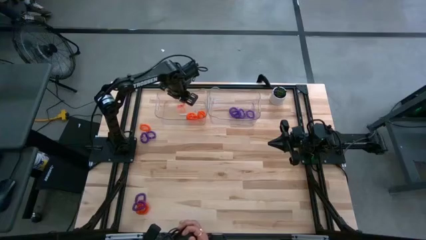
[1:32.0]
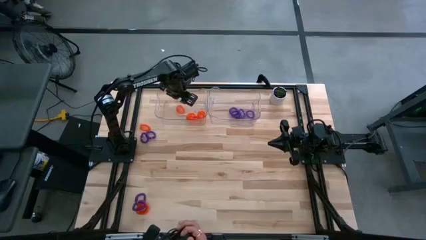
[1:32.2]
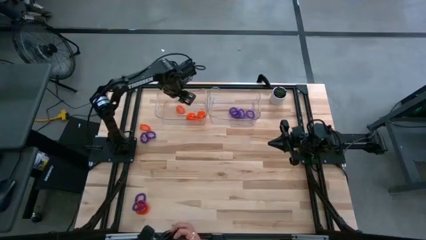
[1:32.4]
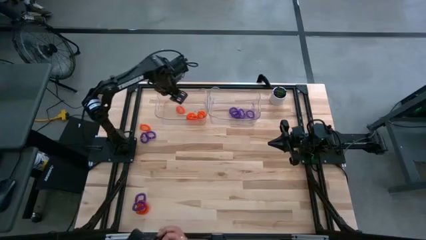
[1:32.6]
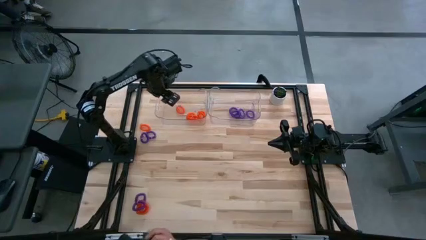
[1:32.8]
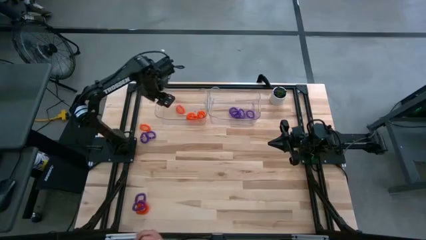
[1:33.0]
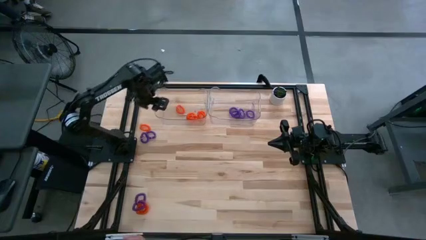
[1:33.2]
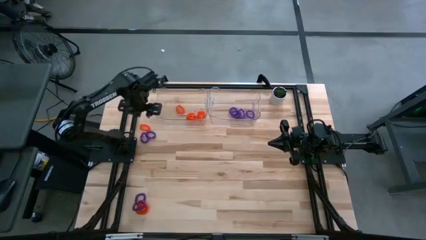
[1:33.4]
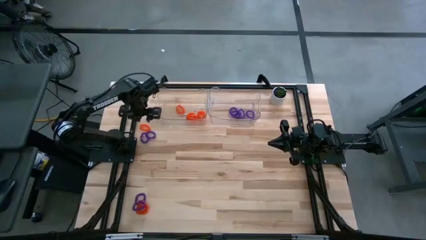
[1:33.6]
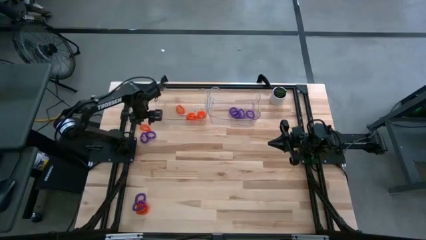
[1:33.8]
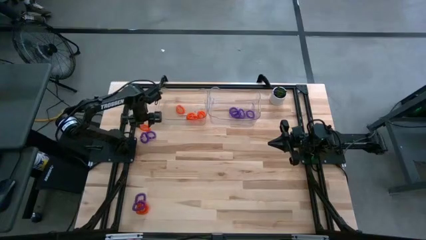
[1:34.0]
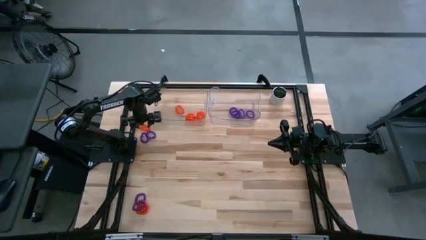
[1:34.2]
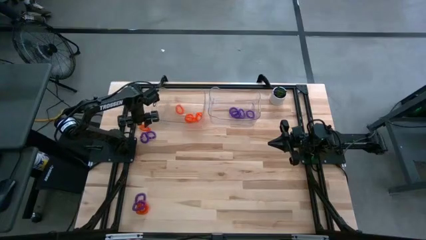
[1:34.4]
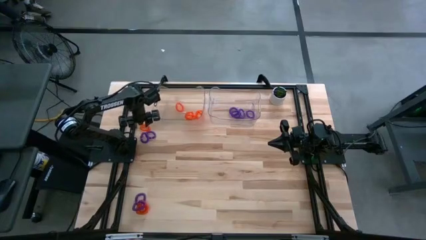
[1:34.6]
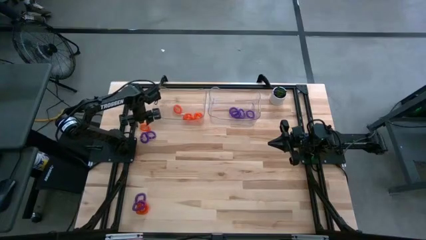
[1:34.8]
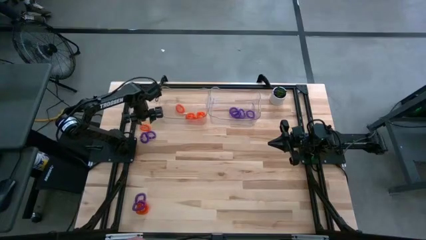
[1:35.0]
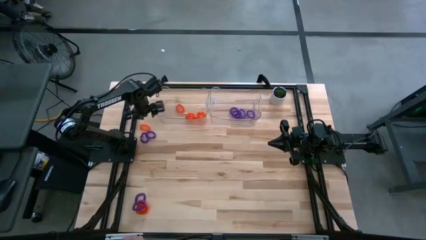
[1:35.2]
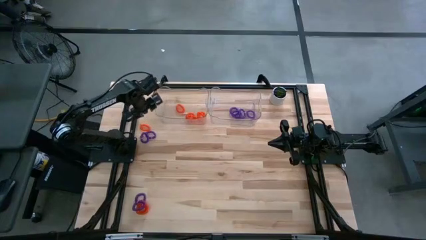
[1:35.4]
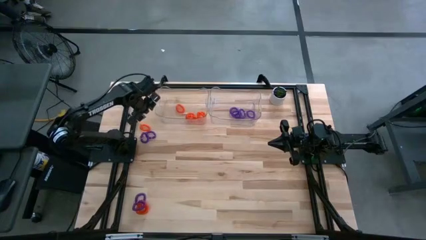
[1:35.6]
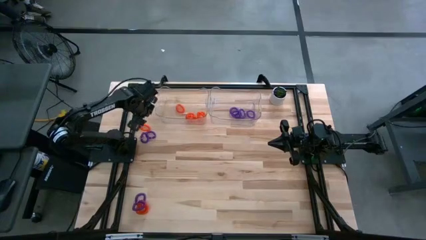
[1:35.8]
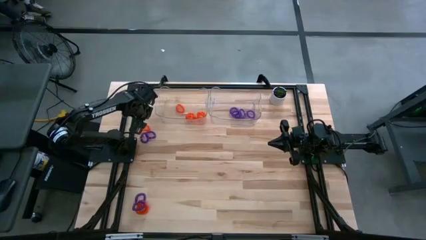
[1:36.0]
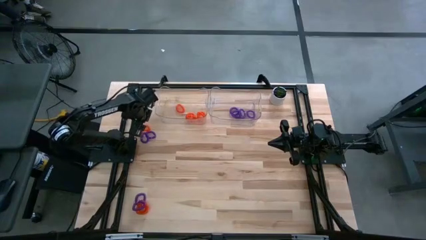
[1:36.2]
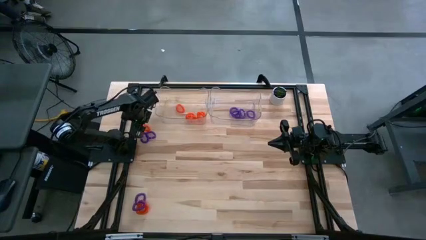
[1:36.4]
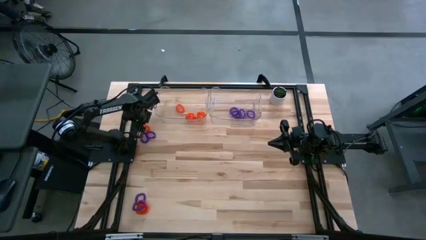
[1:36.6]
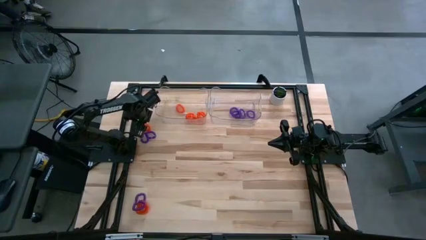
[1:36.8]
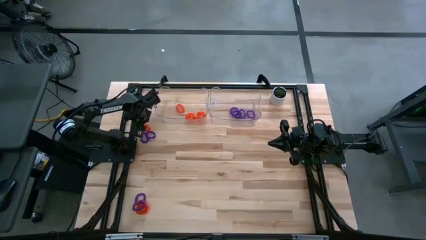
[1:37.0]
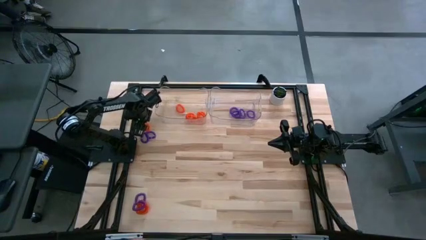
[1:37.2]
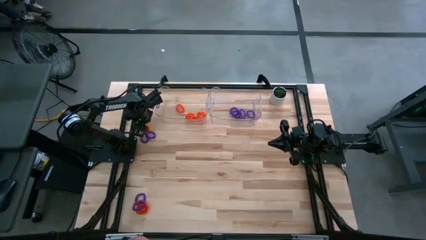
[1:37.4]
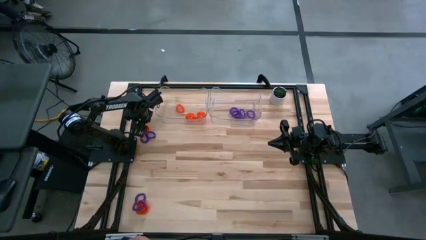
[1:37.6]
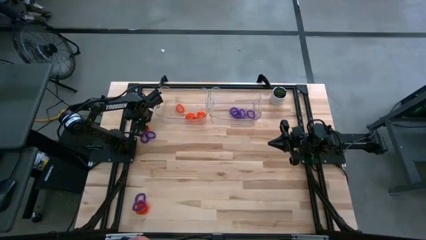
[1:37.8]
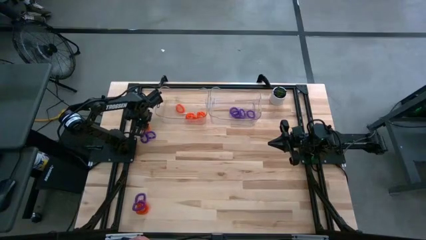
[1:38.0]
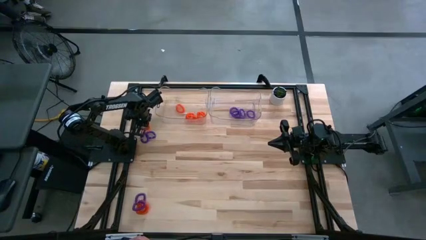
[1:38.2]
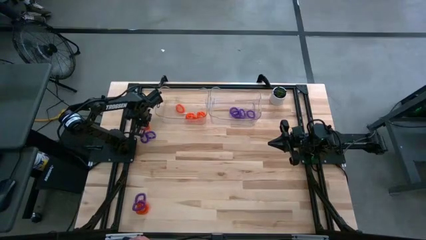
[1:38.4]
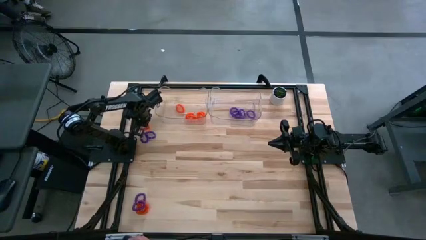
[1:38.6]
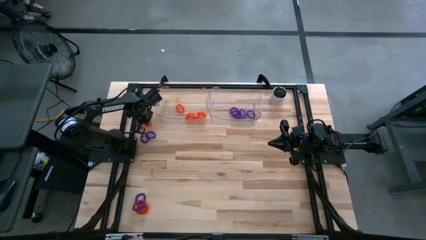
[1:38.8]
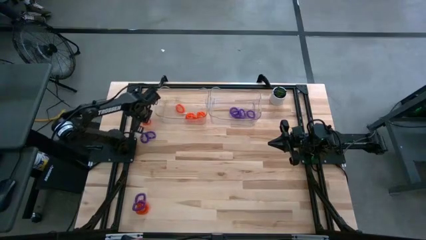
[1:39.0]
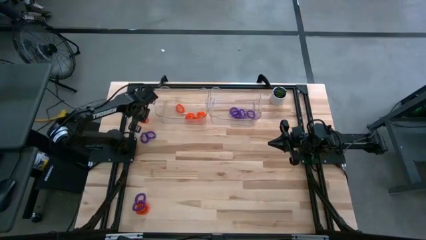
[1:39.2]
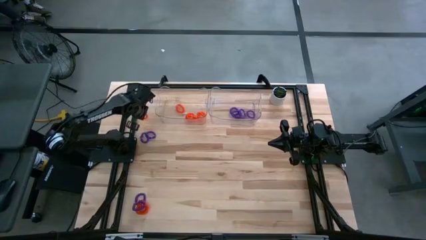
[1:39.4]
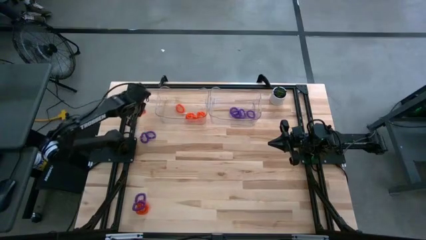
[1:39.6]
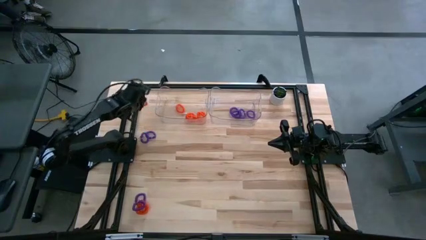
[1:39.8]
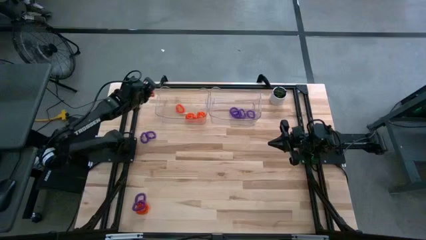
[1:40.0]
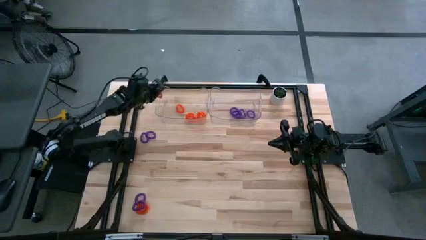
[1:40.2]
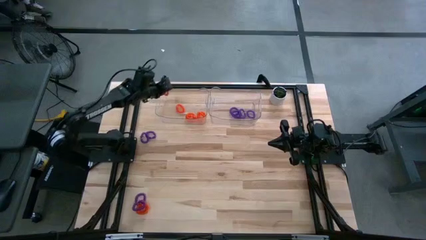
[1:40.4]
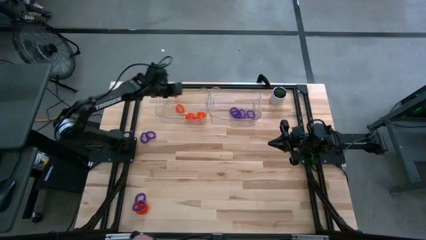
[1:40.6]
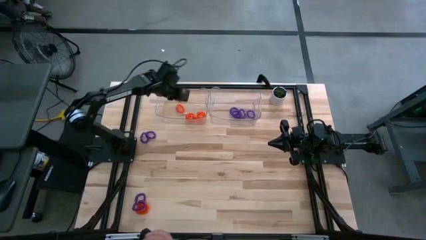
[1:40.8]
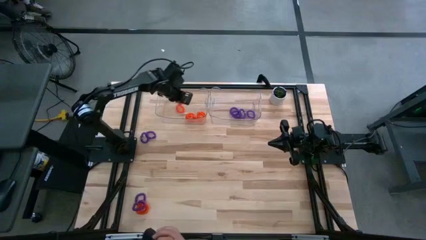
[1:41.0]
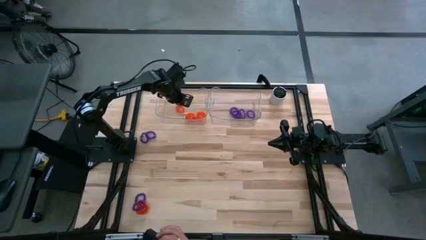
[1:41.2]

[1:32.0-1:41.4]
Task: Sort spring keychains
Put the orange spring keychain into the left transparent bin

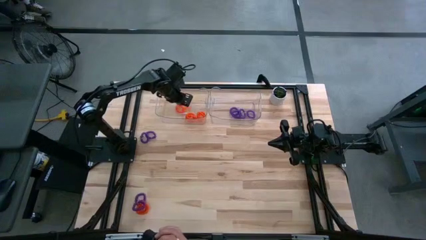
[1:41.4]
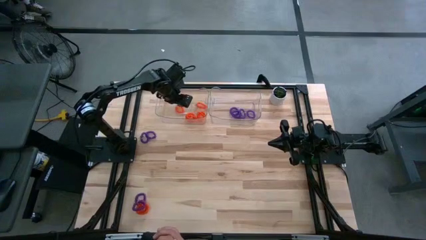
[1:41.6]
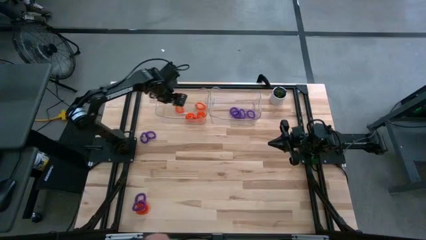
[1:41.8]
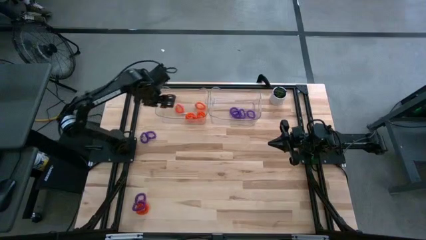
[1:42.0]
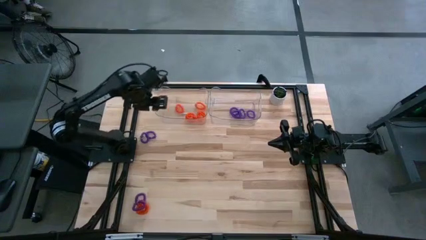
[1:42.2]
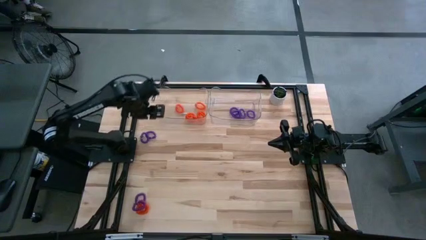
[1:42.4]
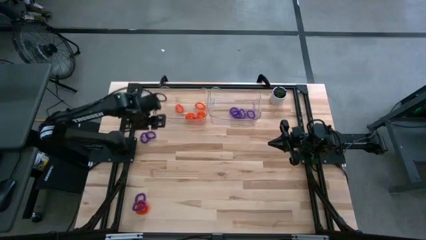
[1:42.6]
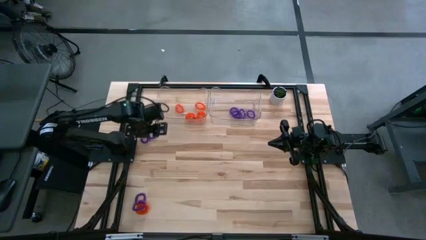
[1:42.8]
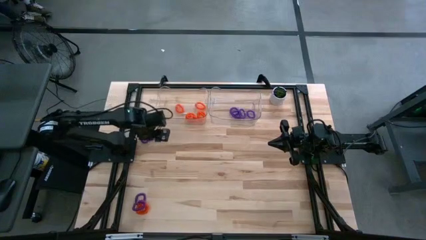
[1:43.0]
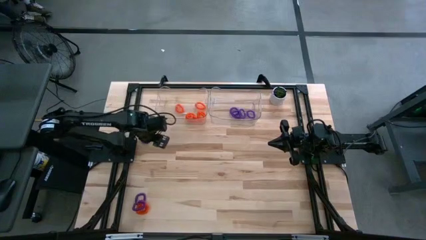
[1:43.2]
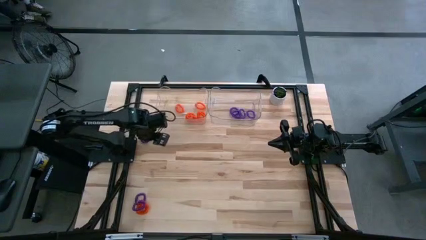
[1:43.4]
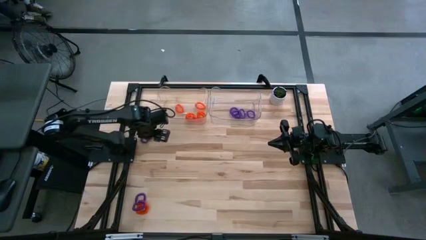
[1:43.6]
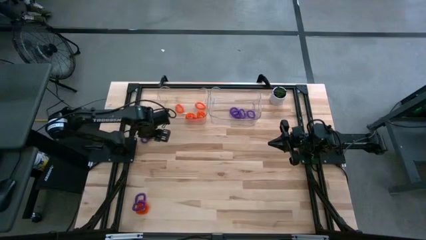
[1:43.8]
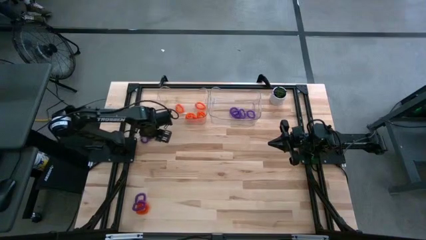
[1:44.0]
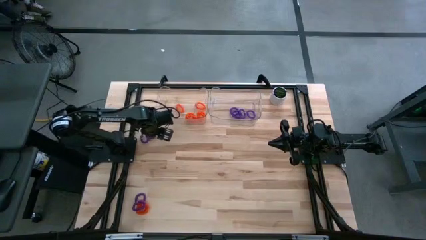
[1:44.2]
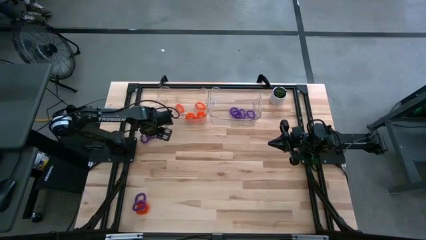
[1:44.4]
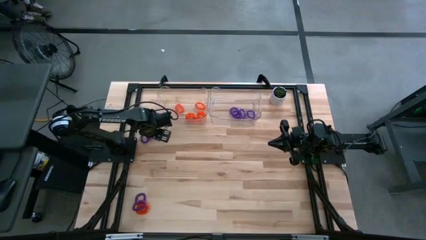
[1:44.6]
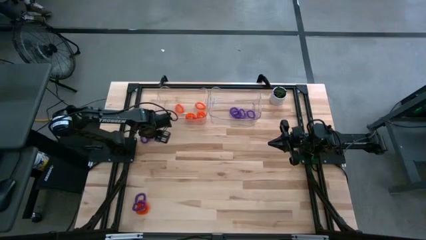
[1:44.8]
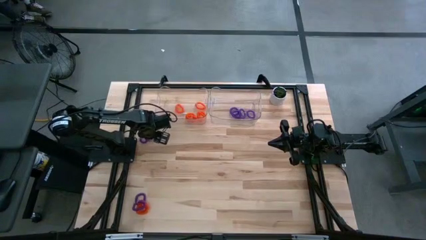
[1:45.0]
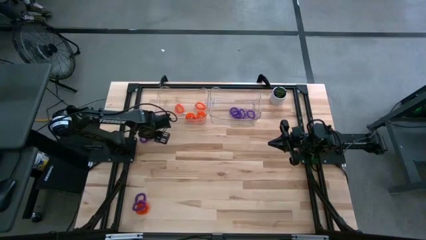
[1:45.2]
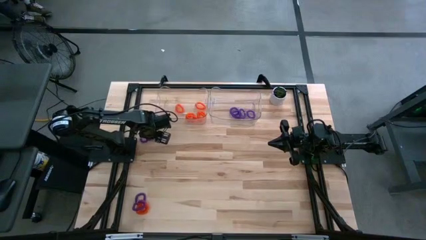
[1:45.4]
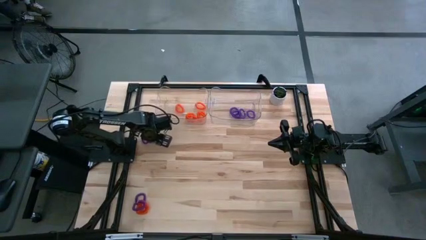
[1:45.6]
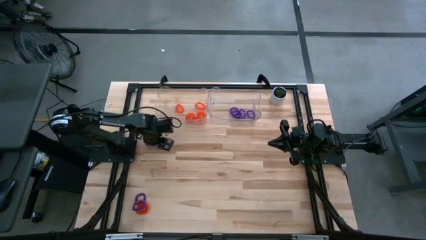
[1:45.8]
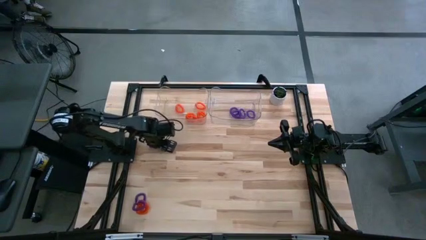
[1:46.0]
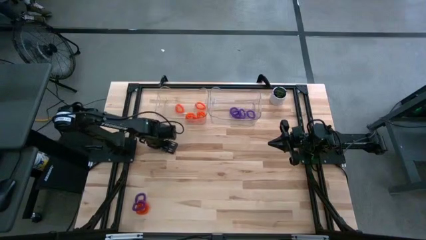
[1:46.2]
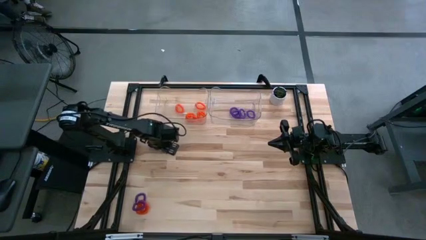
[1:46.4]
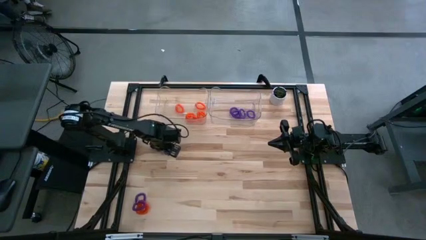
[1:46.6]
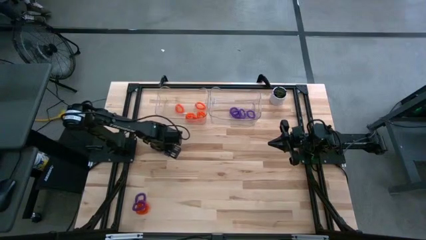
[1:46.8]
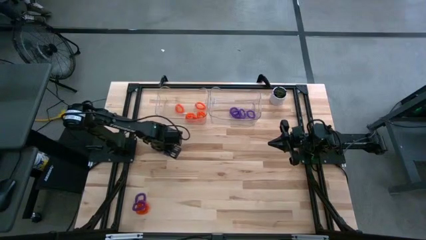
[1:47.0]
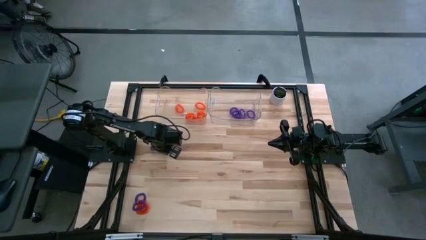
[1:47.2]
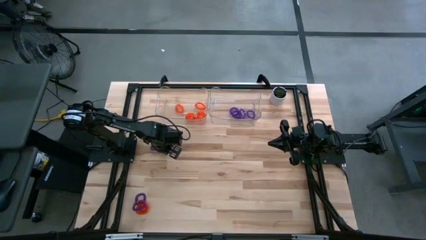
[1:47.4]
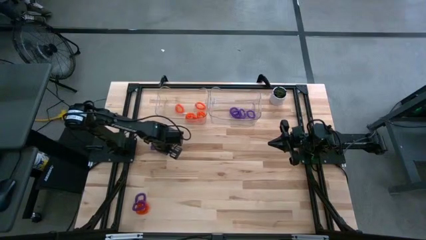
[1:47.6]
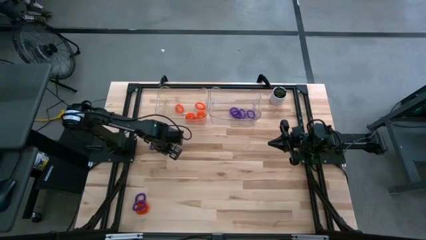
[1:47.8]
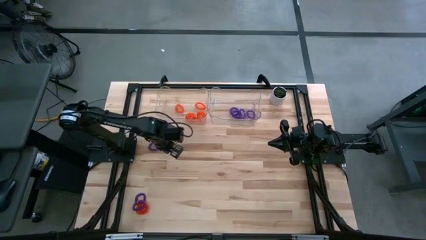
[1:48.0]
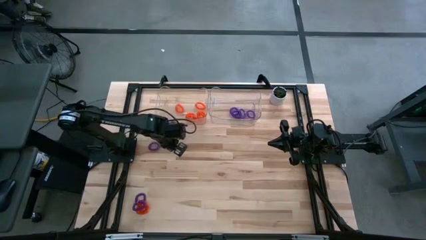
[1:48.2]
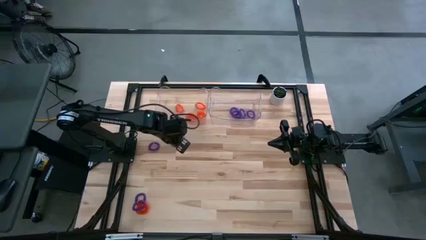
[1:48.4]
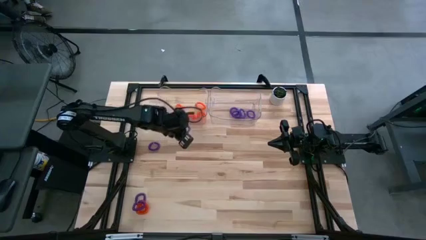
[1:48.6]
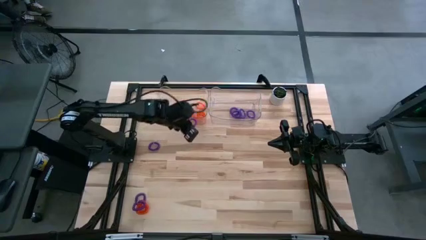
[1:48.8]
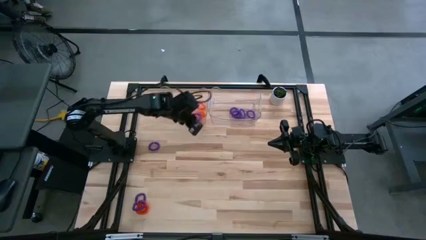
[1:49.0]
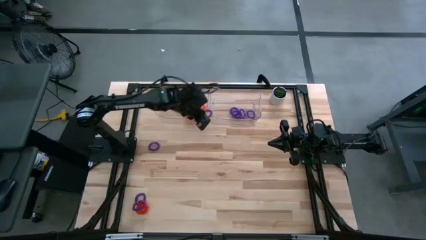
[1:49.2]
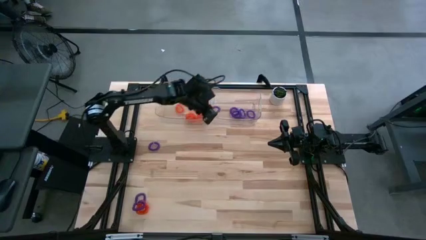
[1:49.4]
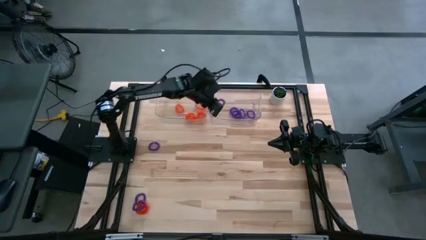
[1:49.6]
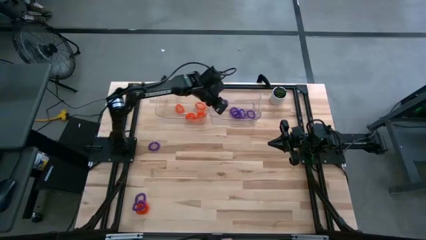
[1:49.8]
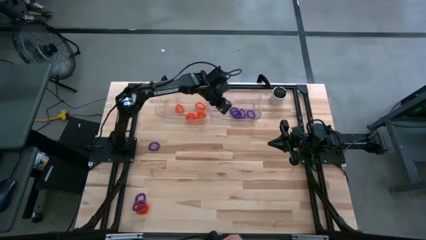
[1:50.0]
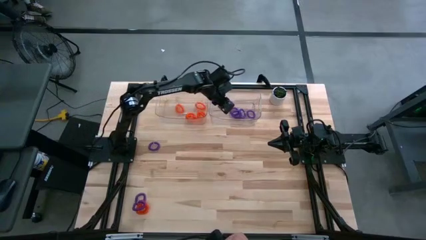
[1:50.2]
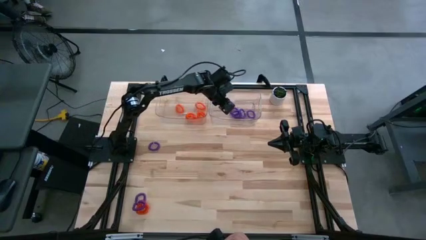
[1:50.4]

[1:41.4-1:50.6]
Put the violet spring keychain into the right transparent bin
